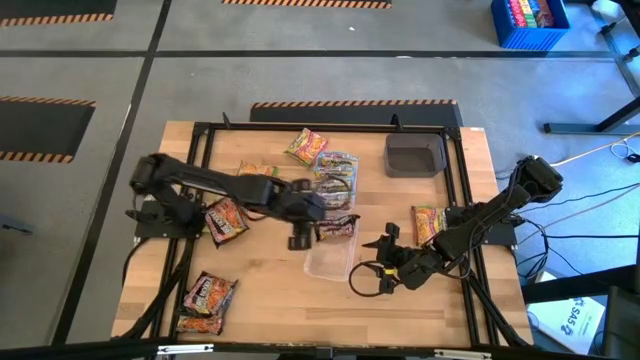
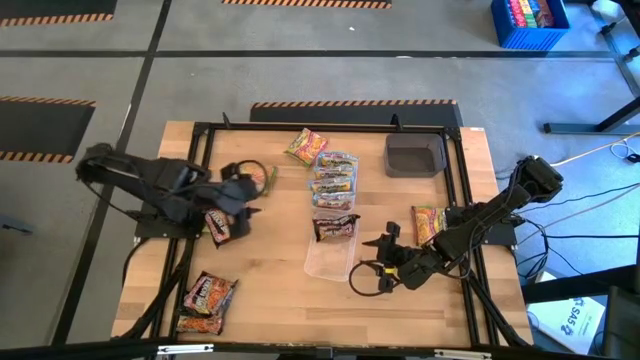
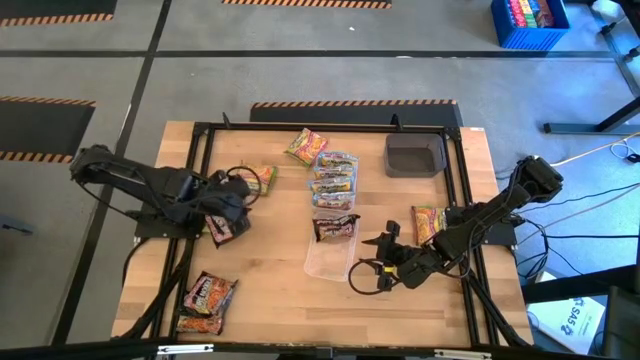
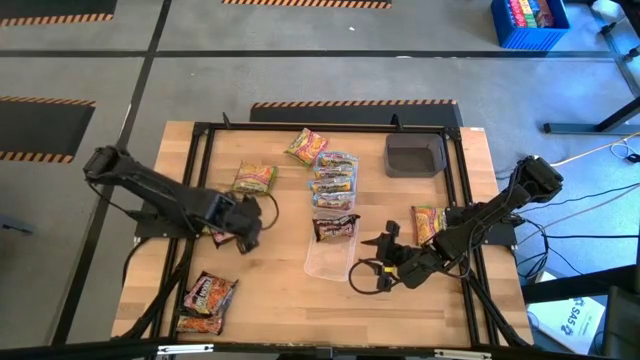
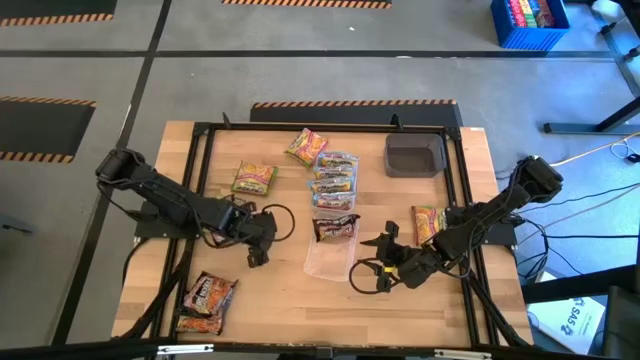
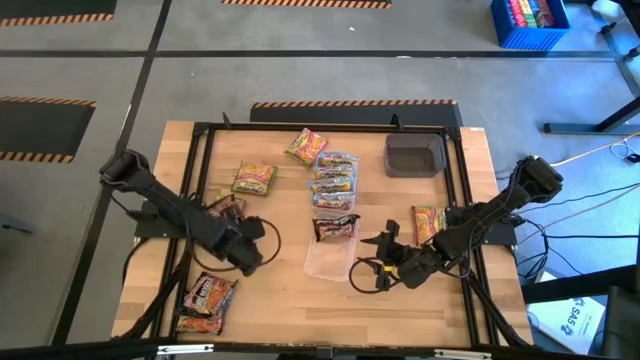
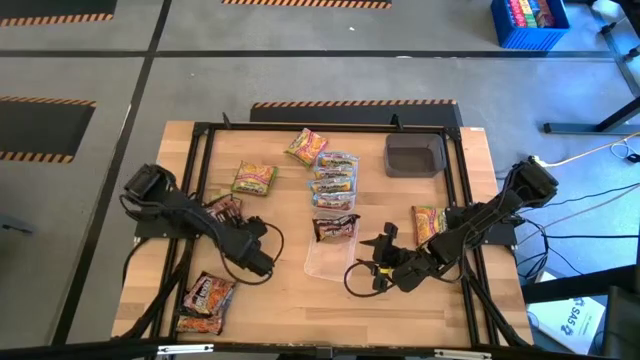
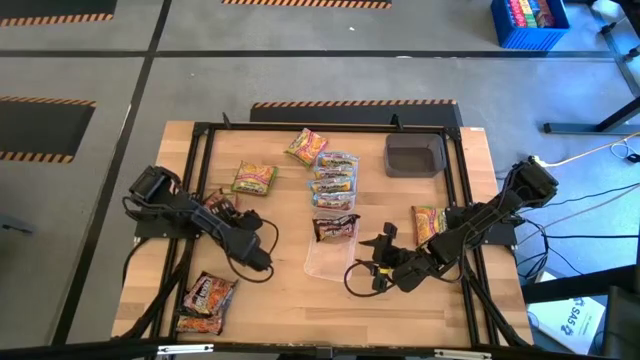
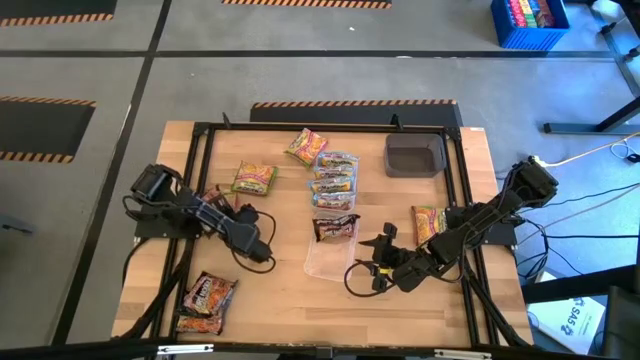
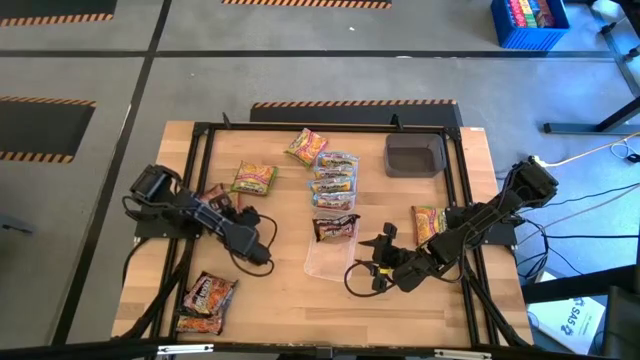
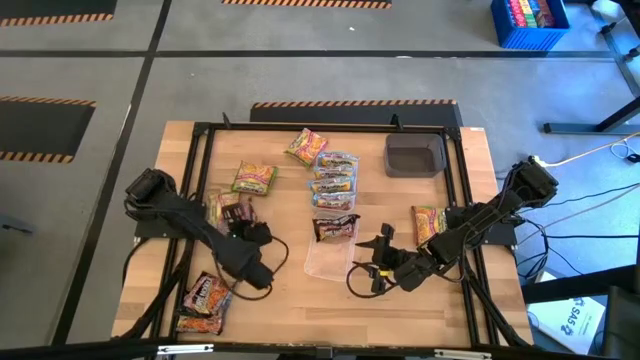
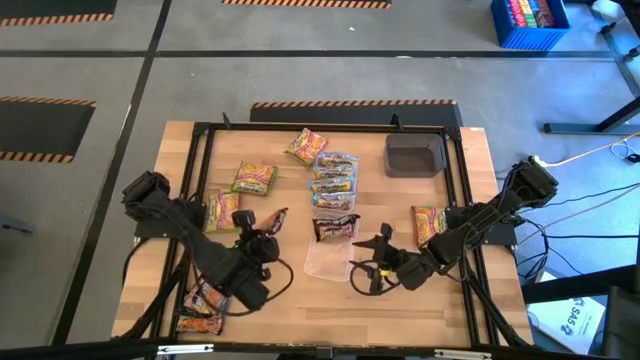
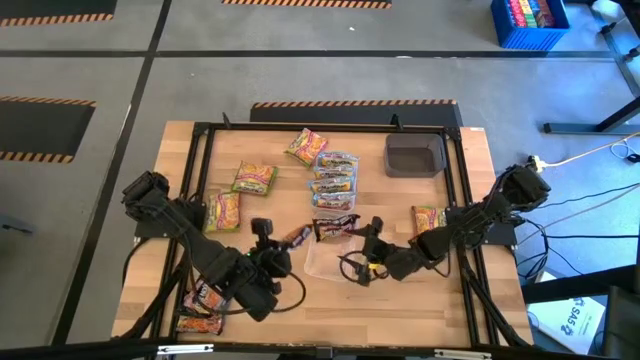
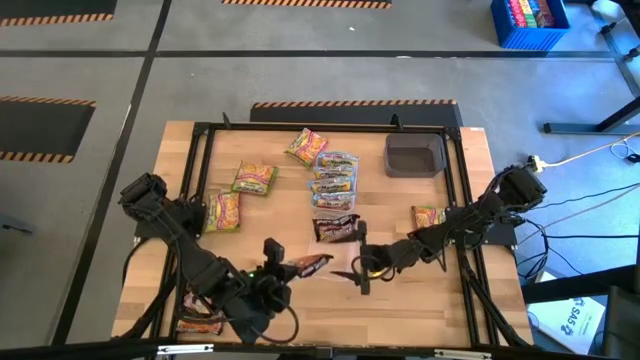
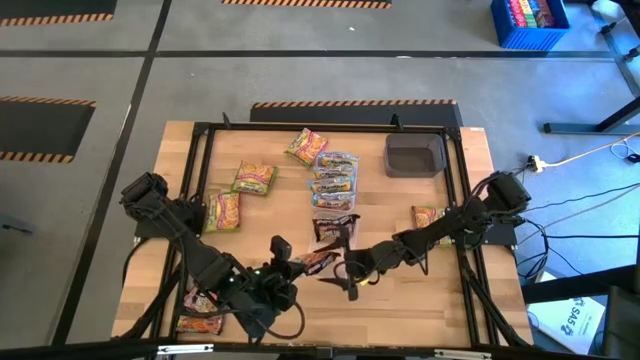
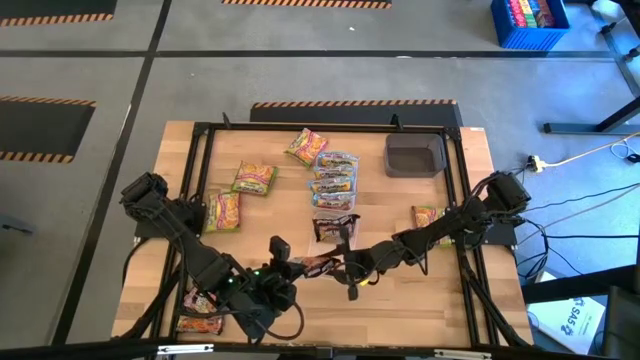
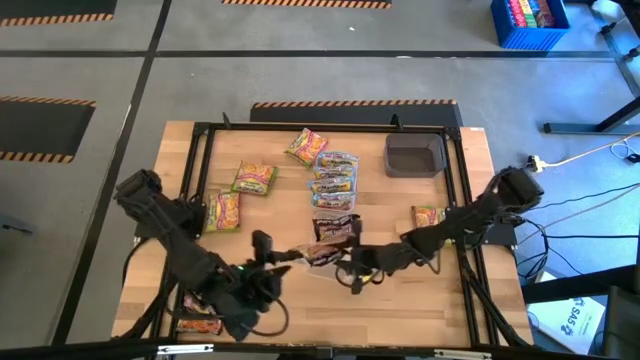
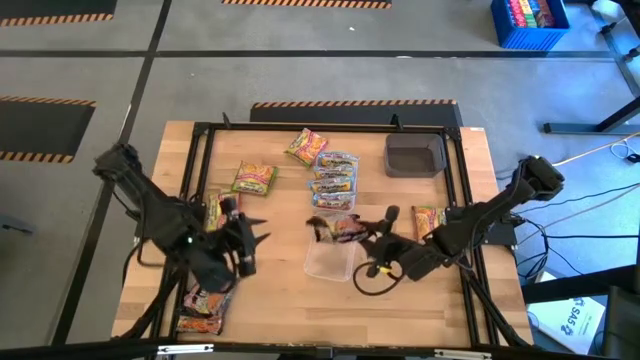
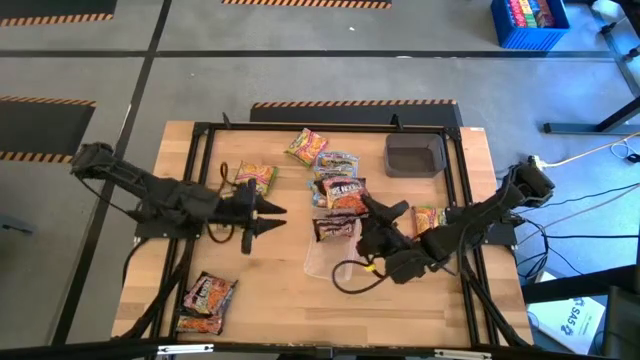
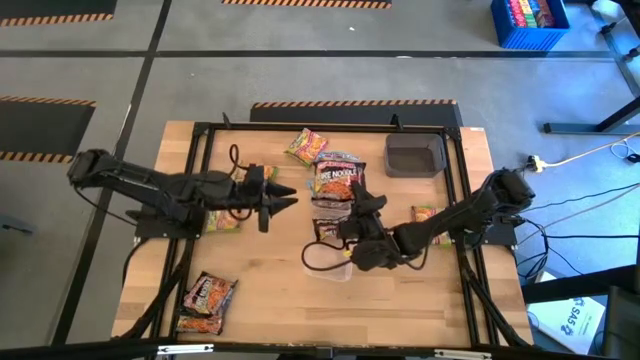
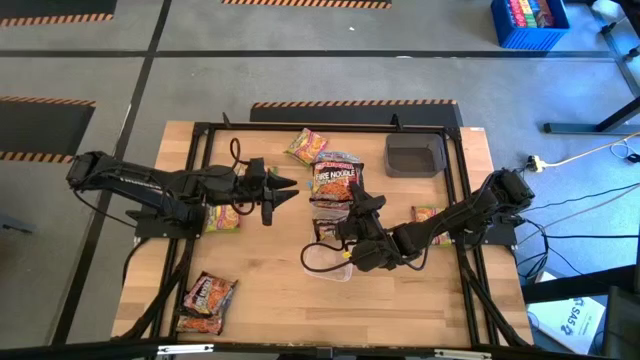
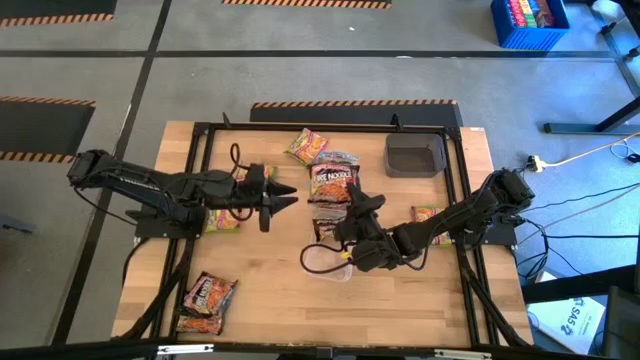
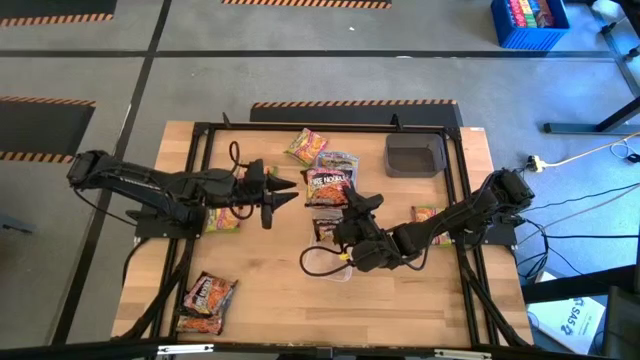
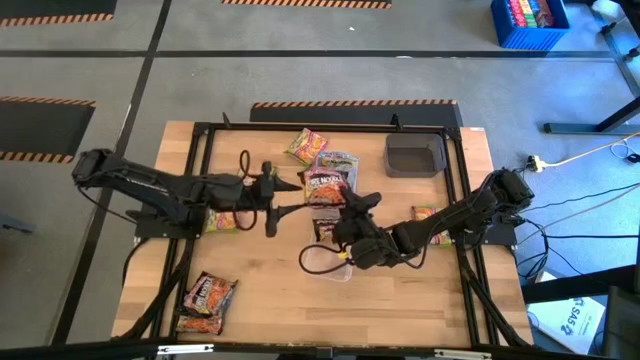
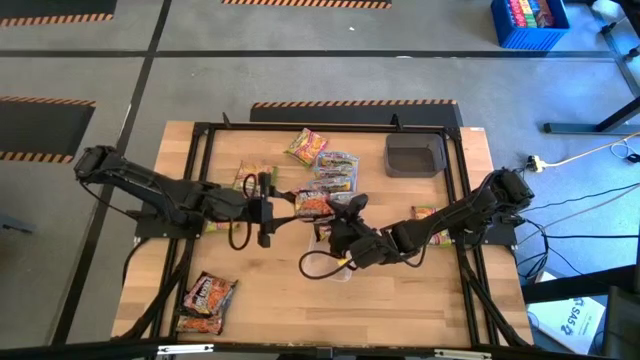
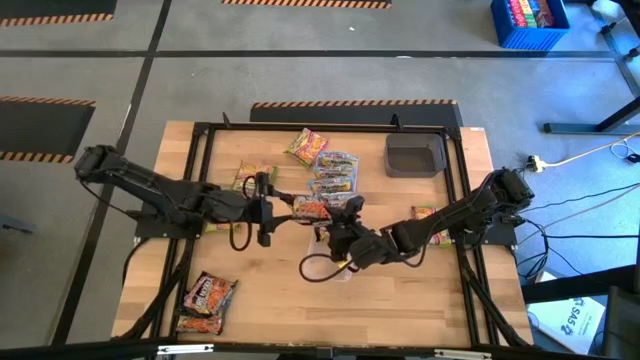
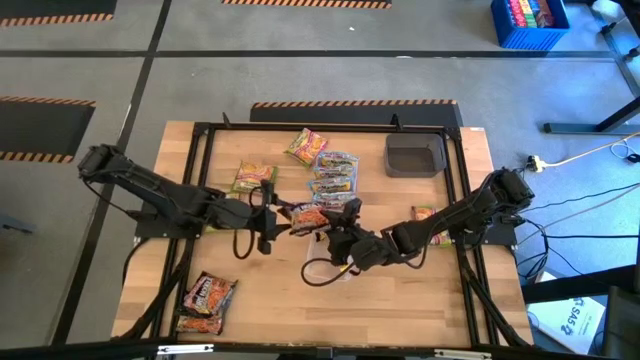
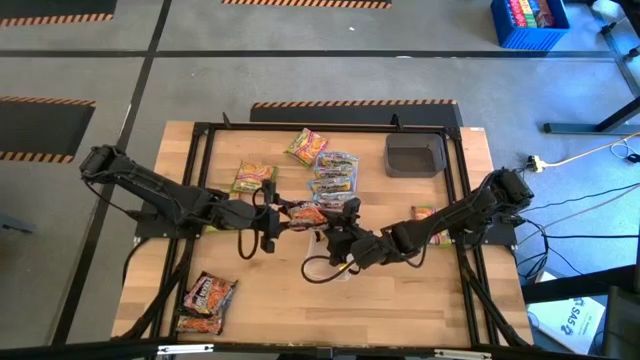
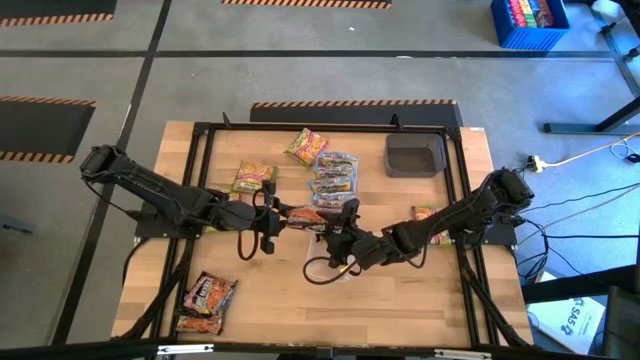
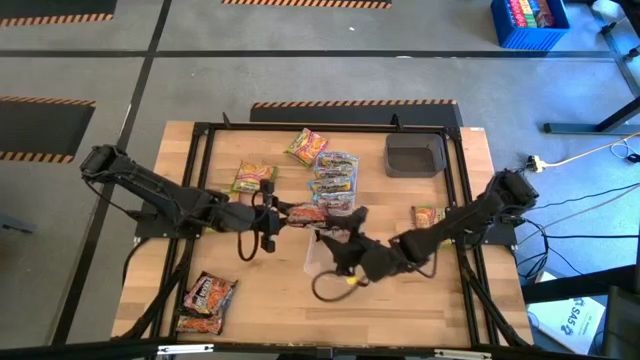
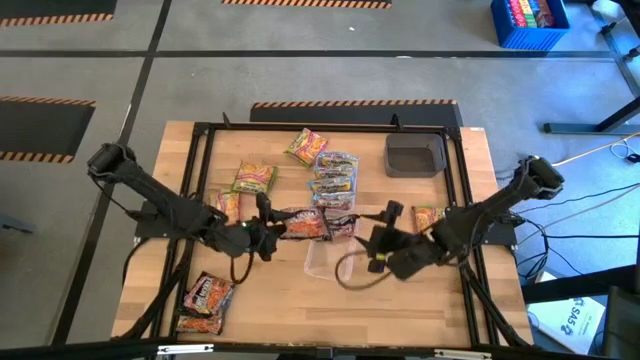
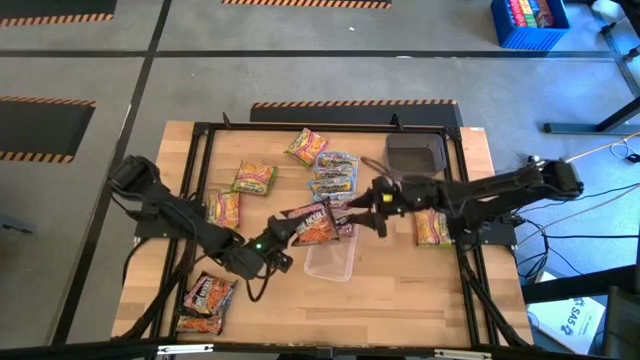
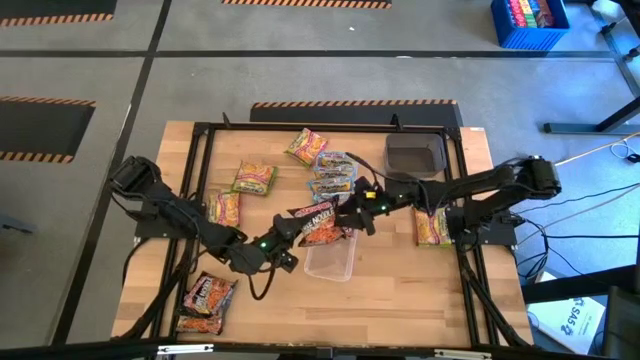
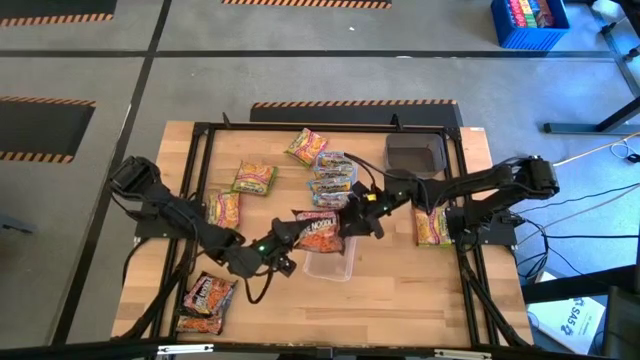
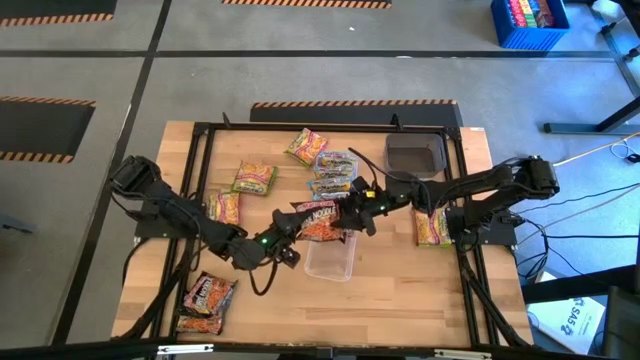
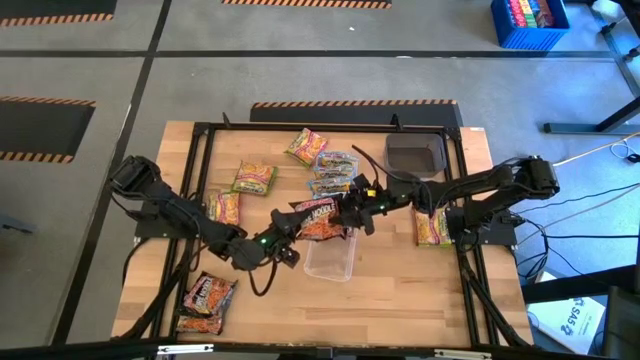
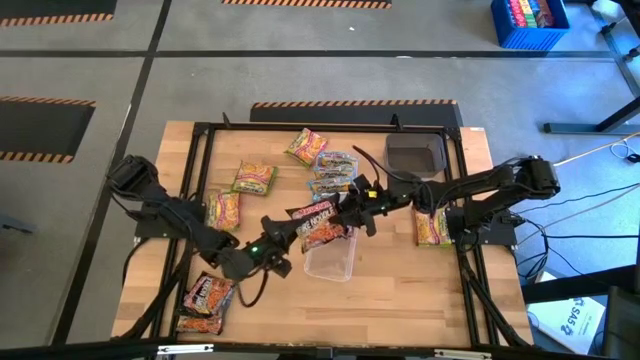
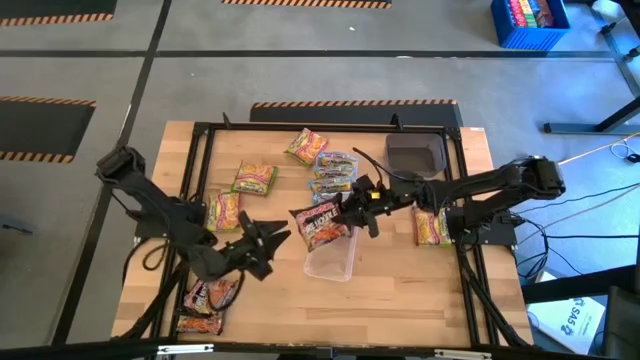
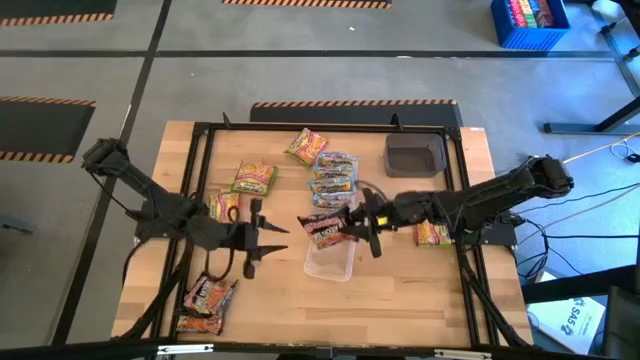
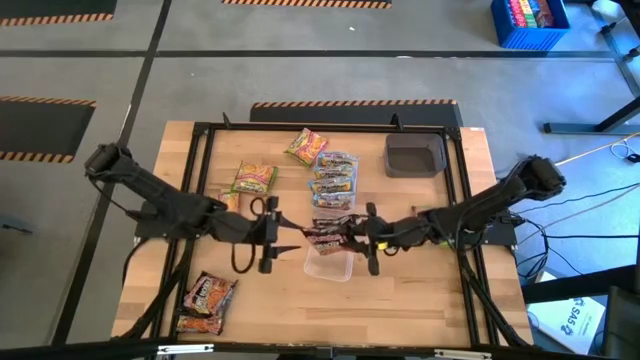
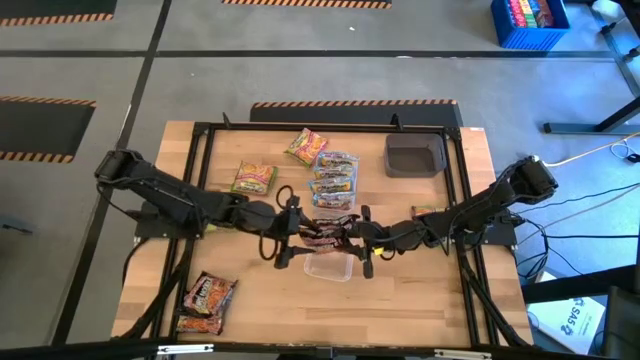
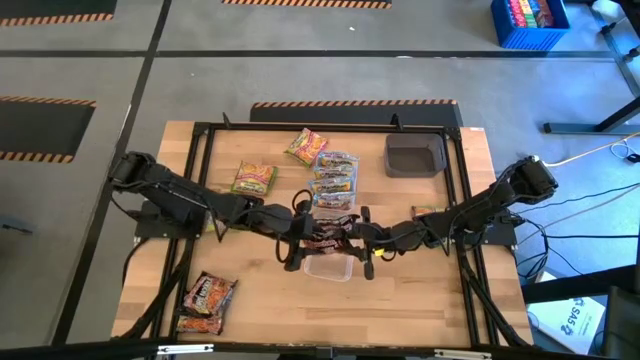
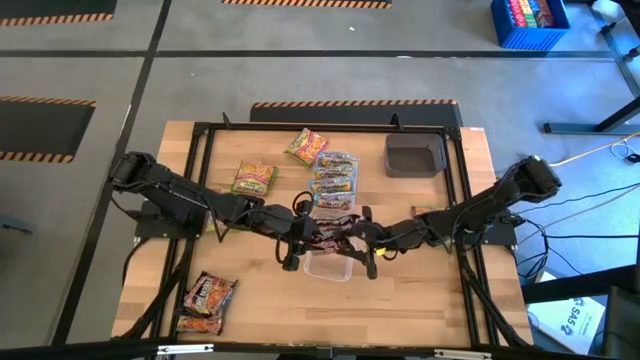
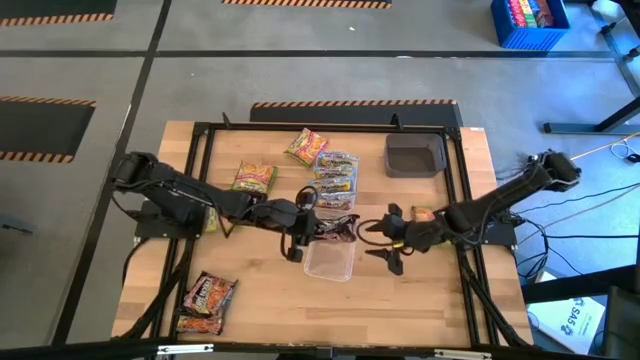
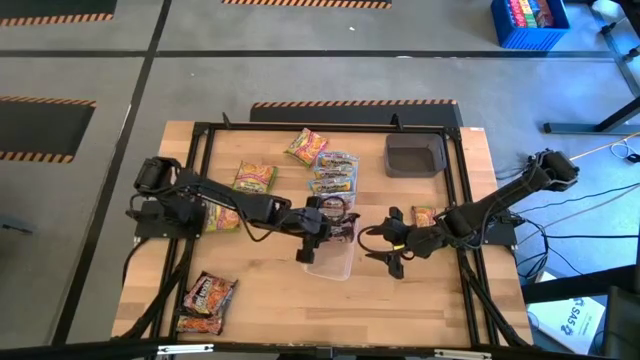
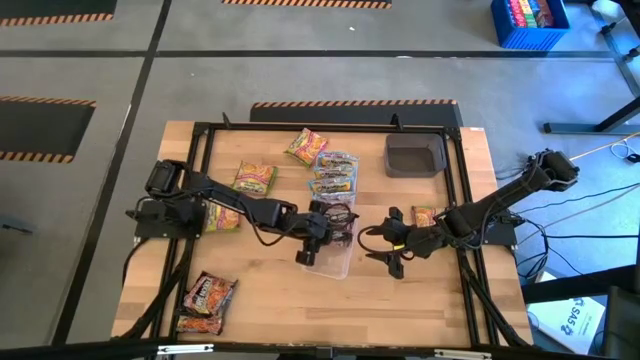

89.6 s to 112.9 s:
Task: Sort Maruchan noodles
Put the top black noodle pack into the bottom transparent bin
